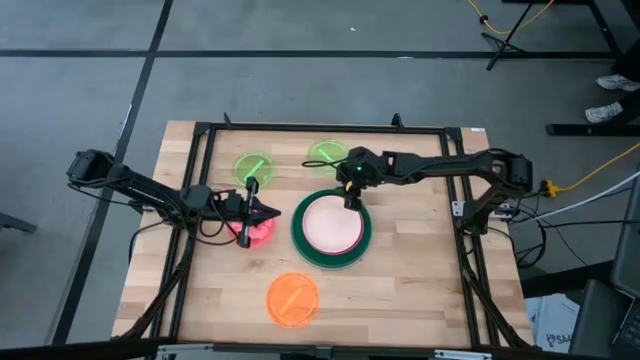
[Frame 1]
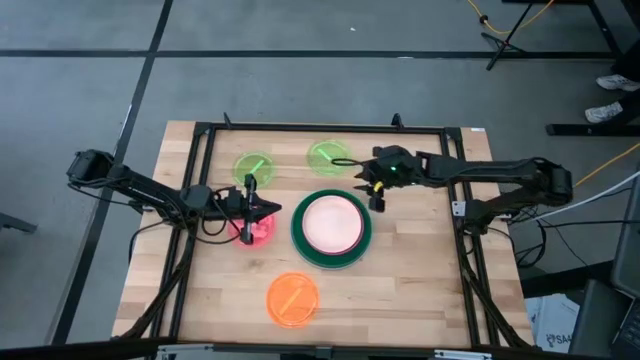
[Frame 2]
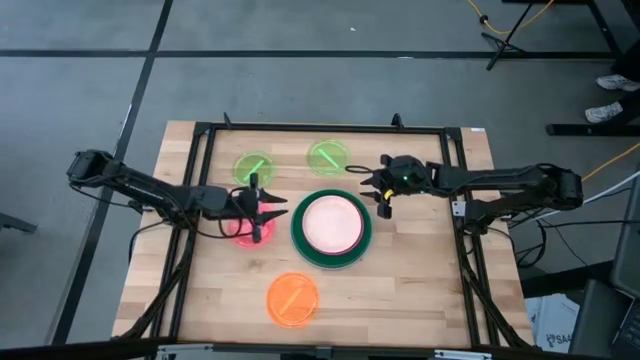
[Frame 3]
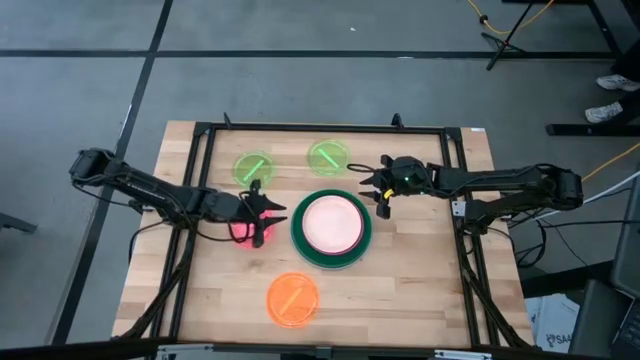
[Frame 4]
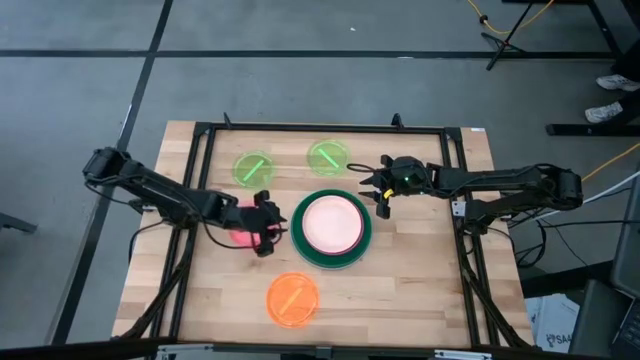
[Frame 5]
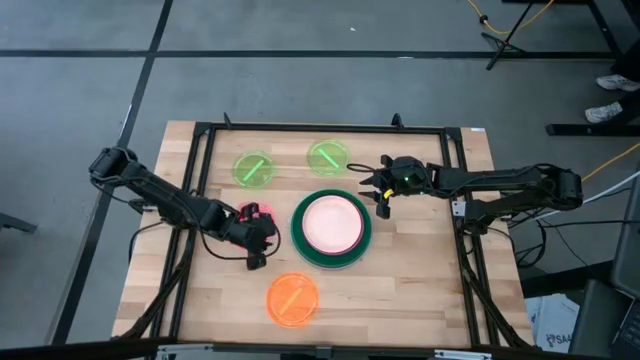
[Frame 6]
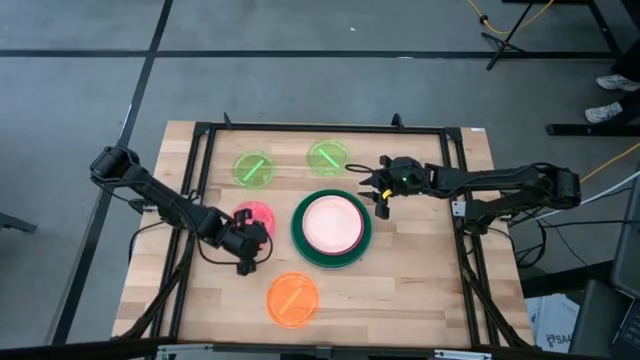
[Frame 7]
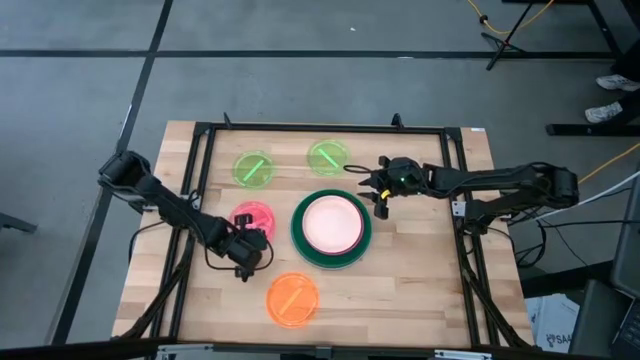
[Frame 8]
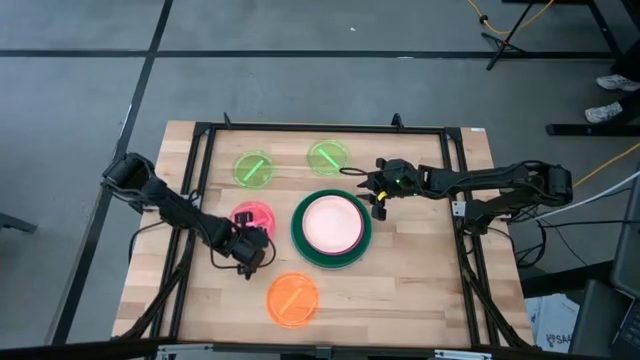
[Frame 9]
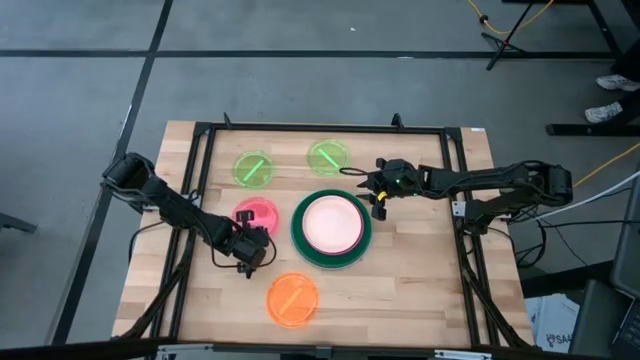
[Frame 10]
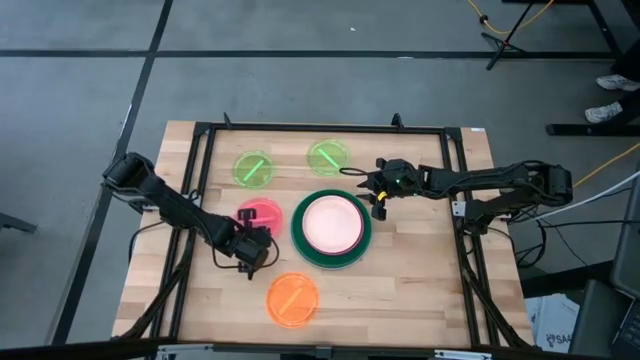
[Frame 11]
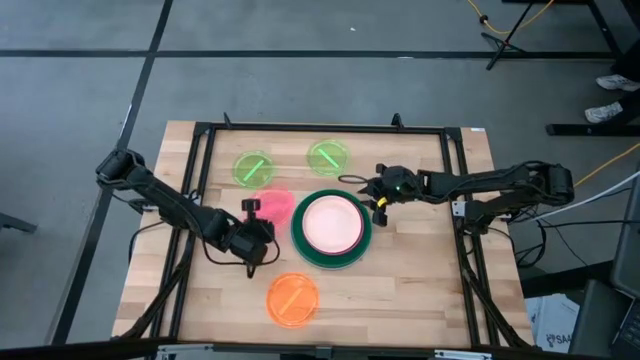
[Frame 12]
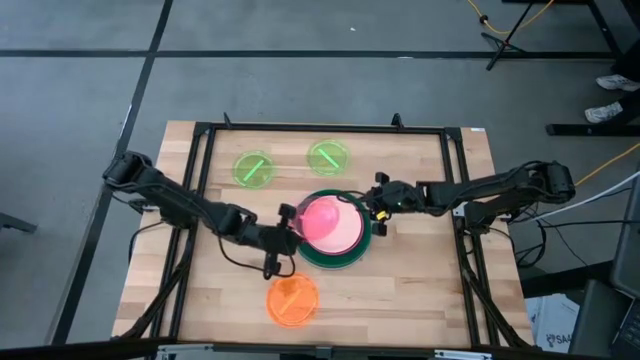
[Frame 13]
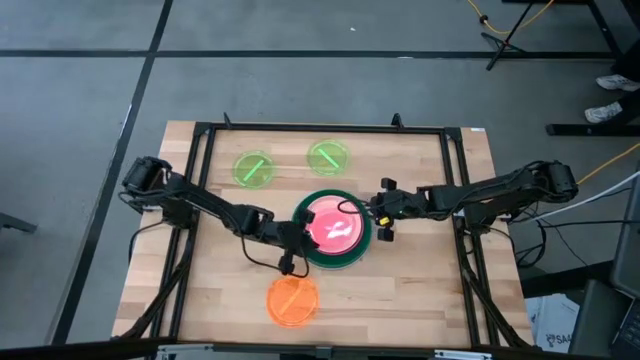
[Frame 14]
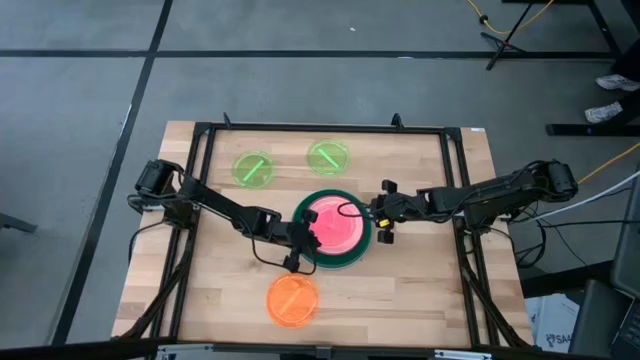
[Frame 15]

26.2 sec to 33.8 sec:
Task: Stack plastic plates
Stack the light pink plate on top of the orange plate

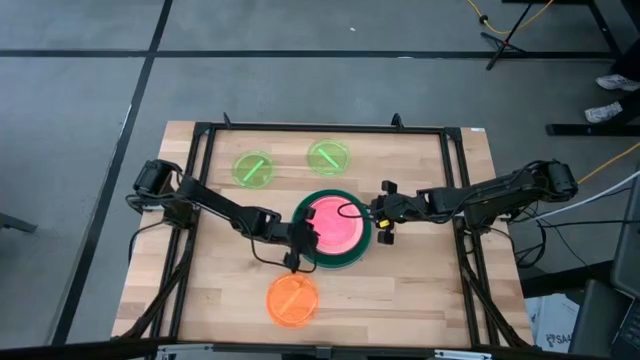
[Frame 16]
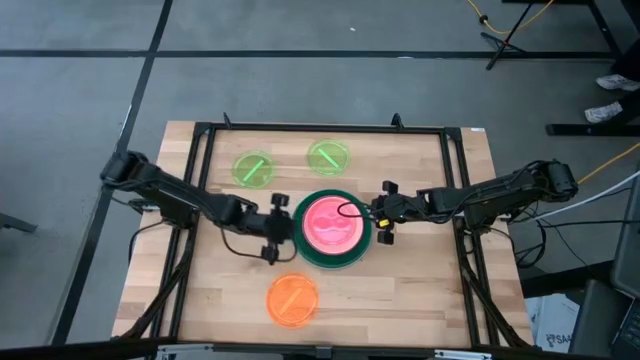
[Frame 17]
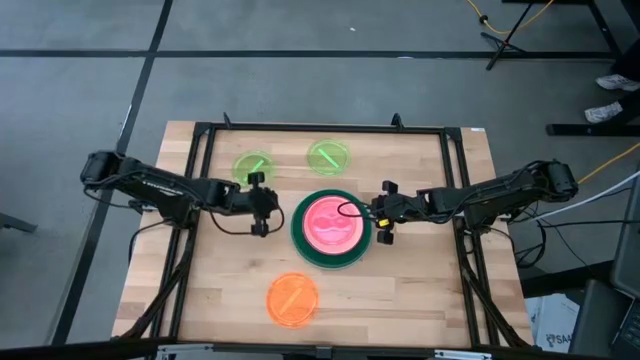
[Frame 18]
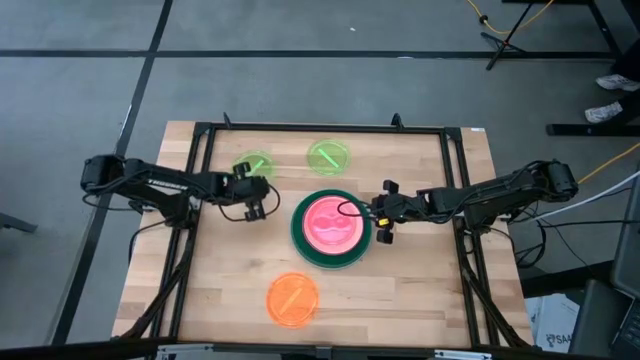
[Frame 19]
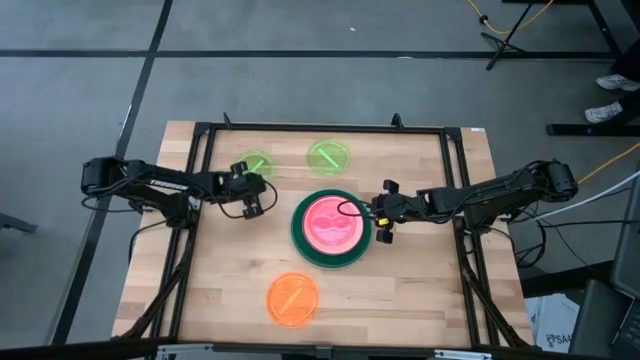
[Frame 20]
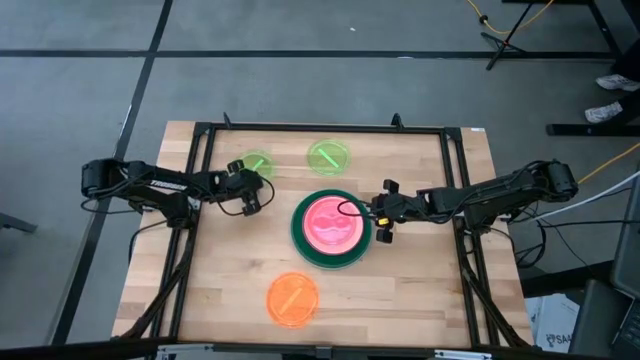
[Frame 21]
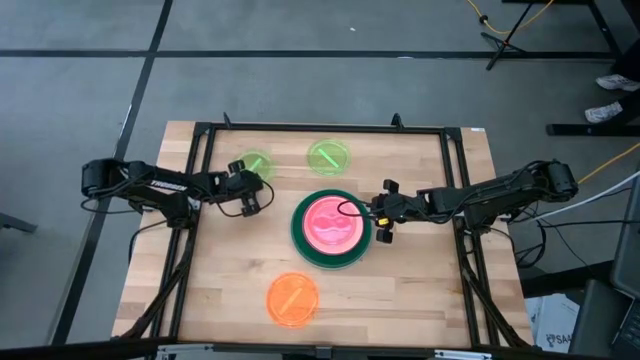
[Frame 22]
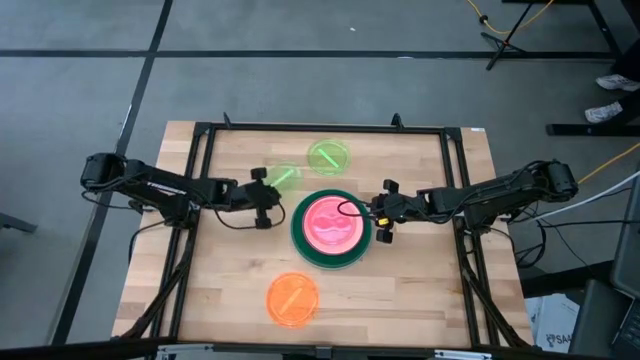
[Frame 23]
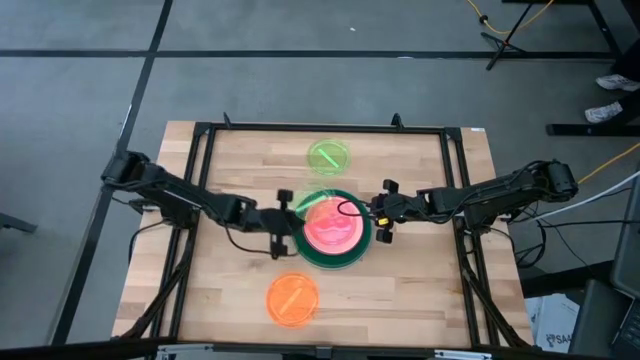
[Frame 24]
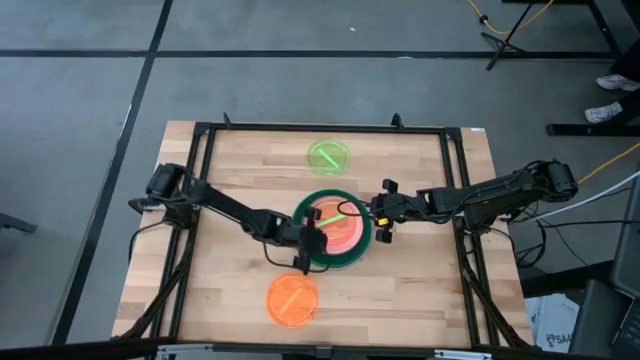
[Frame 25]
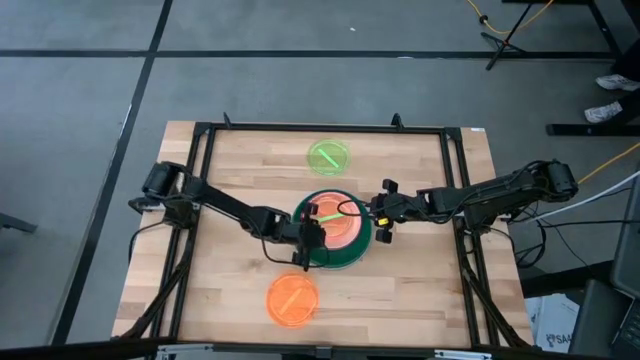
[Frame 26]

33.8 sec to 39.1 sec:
Stack the left light green plate on top of the light pink plate

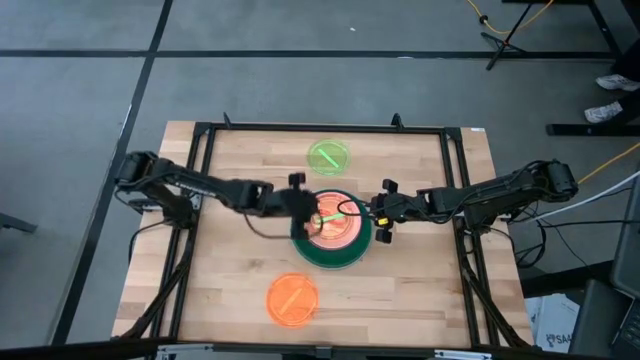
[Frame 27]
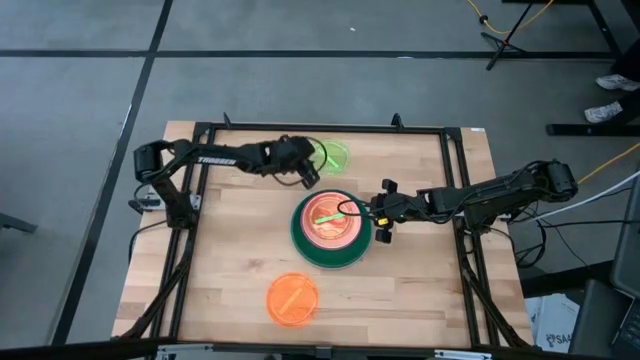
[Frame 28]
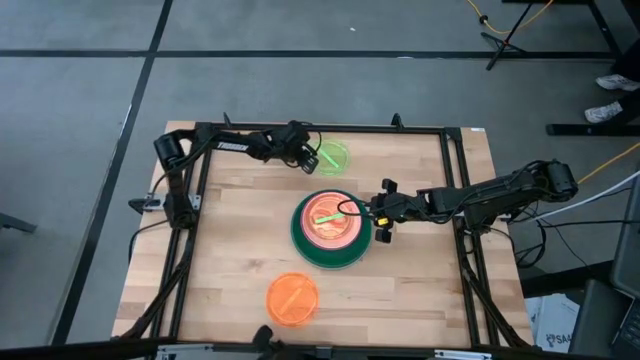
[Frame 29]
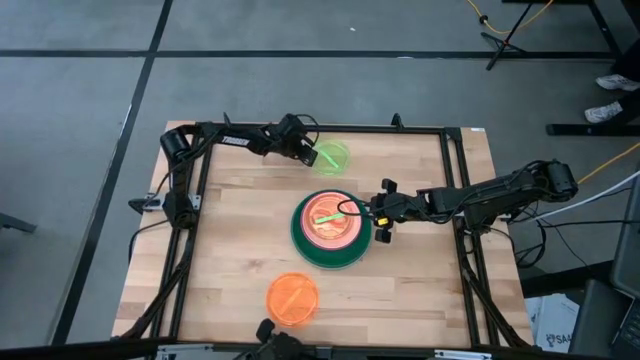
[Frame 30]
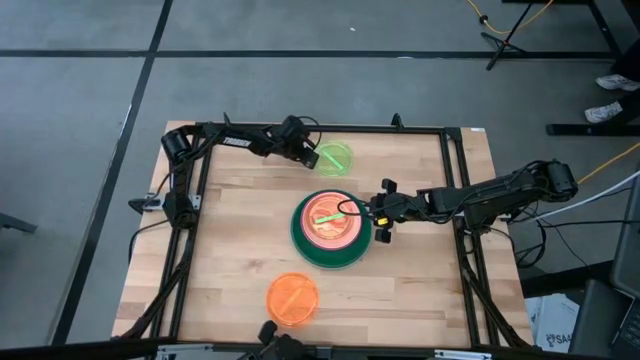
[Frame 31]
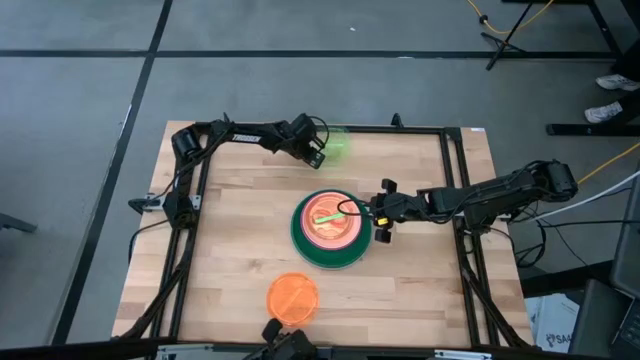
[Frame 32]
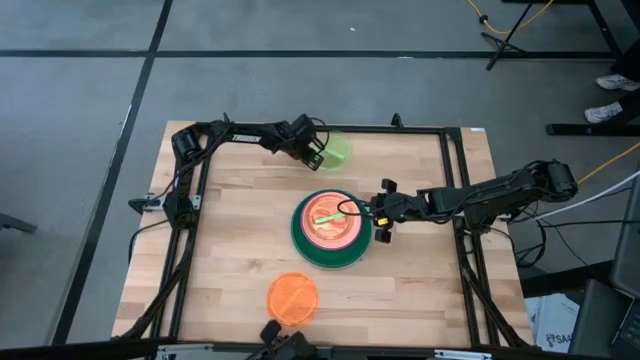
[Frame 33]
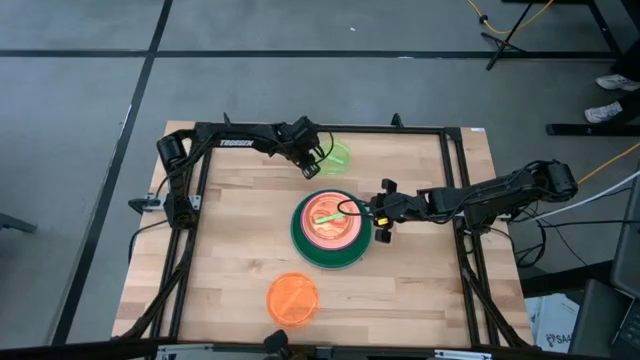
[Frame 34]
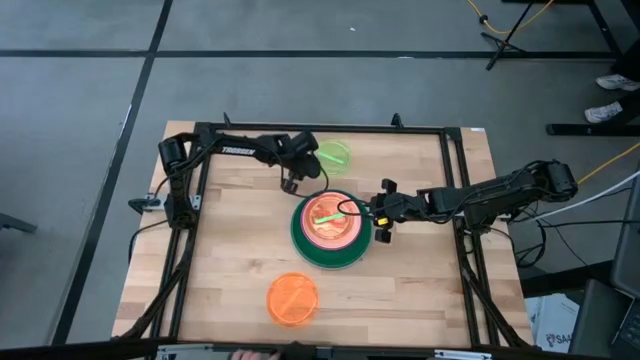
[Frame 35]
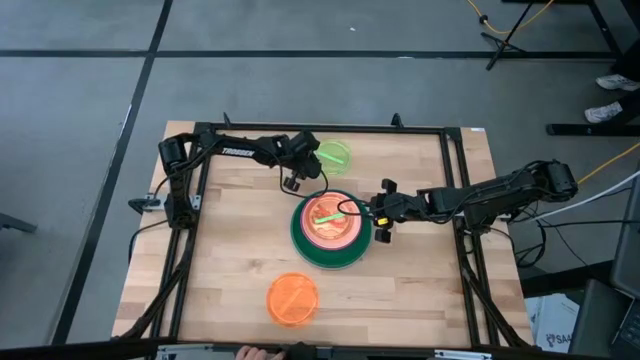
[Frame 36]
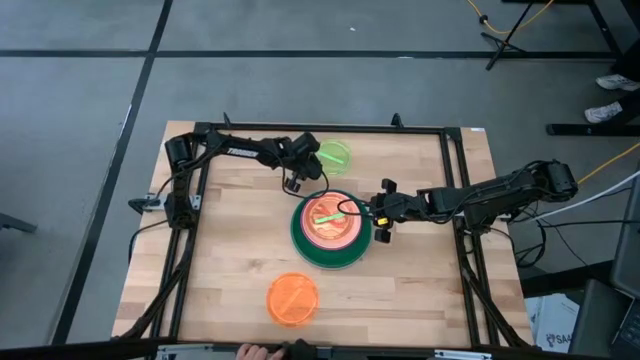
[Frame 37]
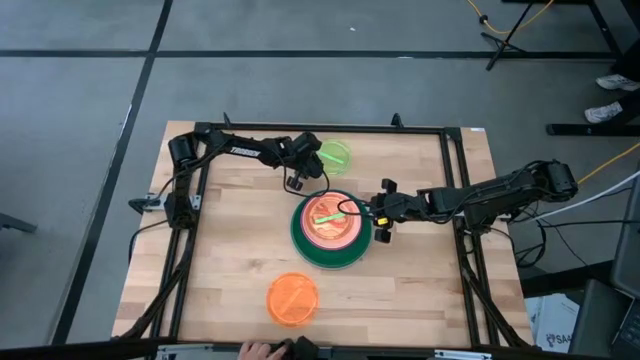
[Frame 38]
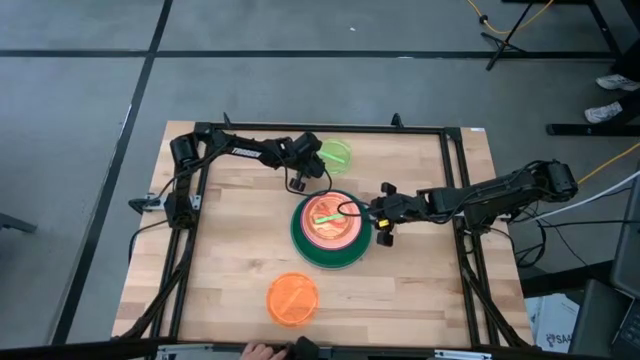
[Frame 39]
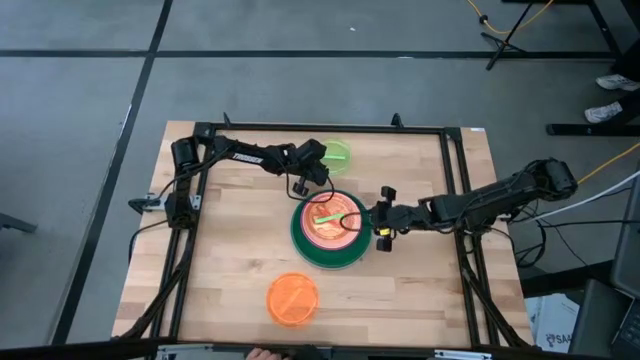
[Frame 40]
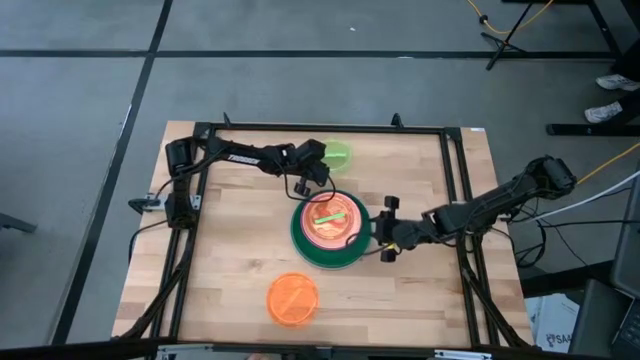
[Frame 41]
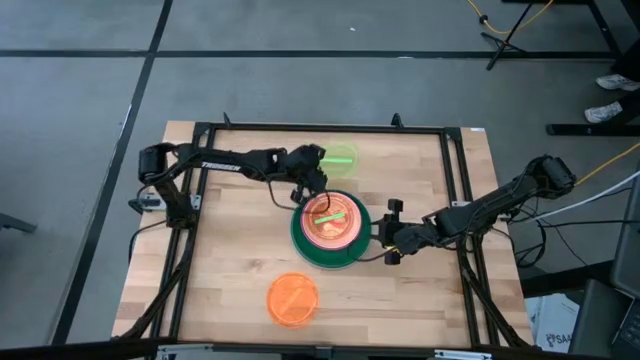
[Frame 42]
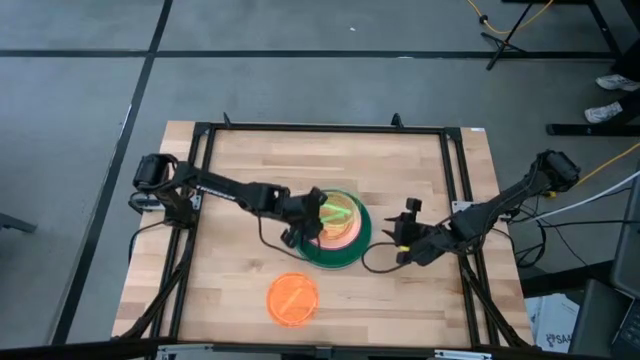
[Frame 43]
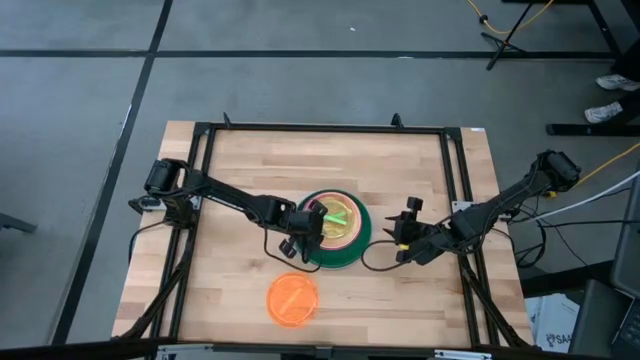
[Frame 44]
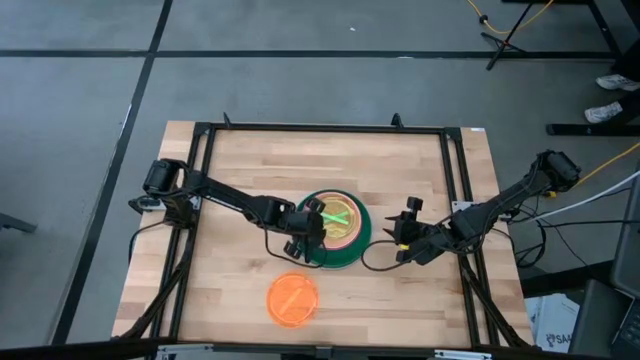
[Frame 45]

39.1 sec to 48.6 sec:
Stack the light green plate on top of the light green plate
